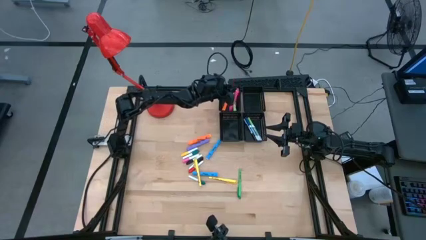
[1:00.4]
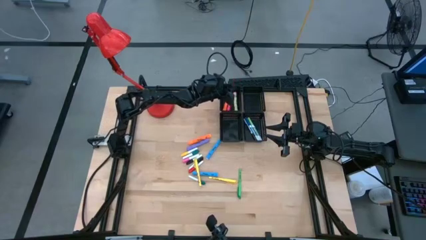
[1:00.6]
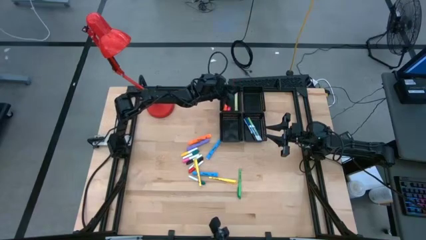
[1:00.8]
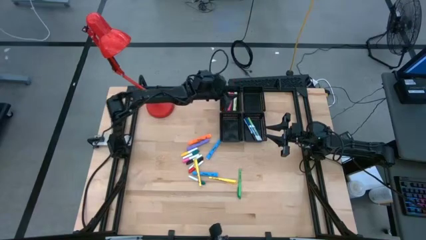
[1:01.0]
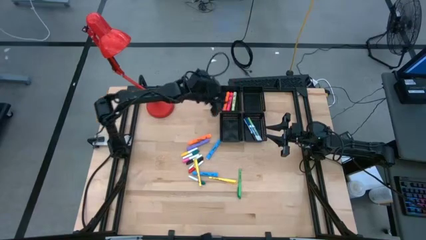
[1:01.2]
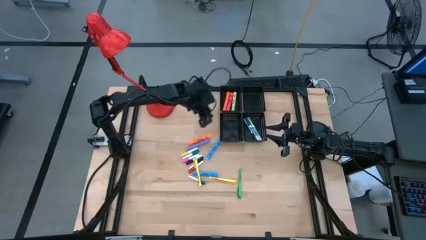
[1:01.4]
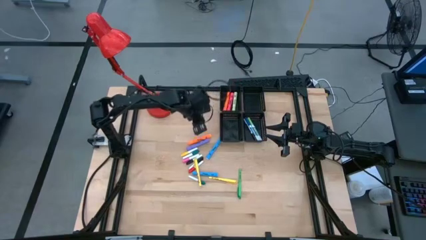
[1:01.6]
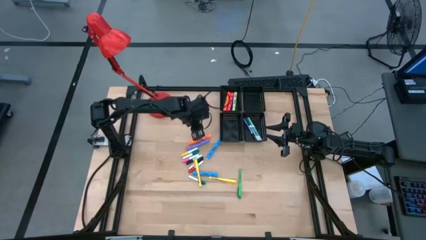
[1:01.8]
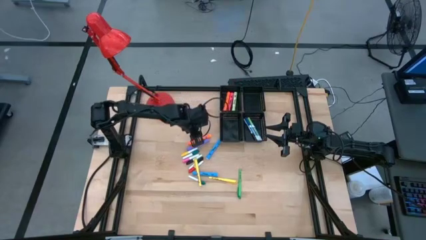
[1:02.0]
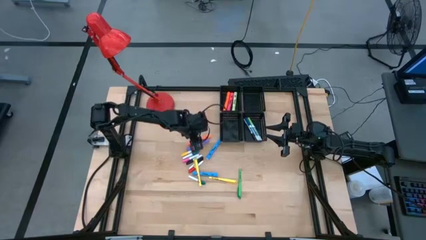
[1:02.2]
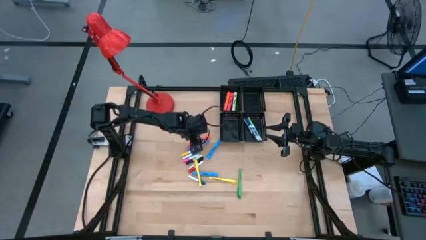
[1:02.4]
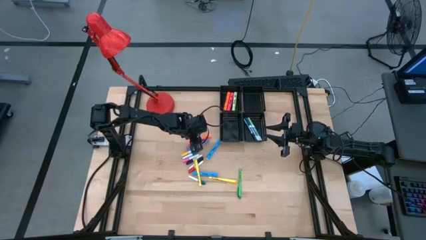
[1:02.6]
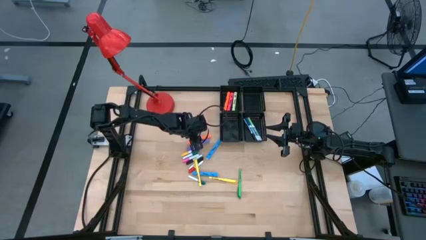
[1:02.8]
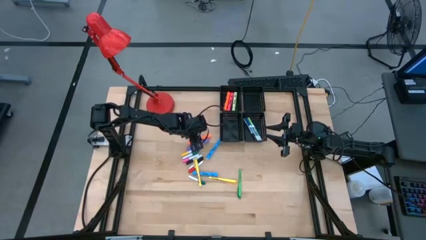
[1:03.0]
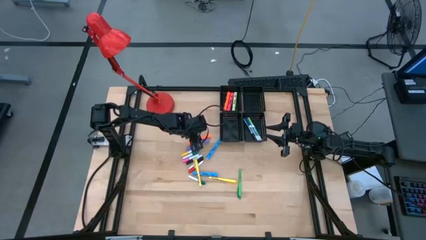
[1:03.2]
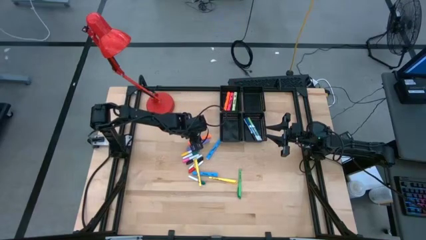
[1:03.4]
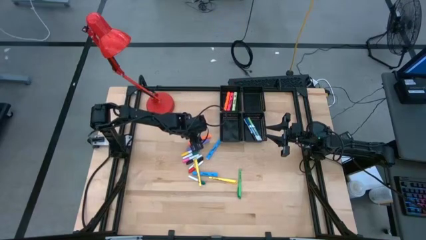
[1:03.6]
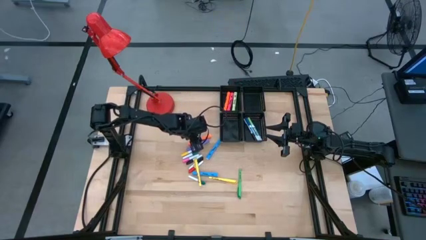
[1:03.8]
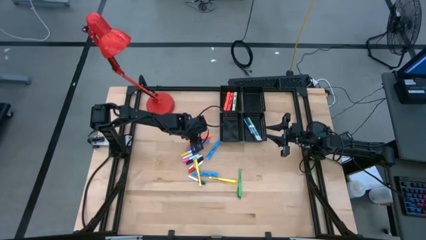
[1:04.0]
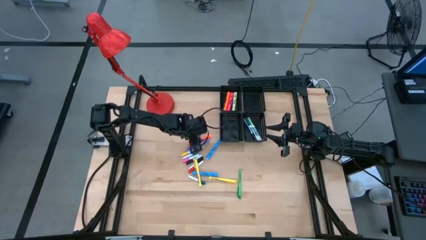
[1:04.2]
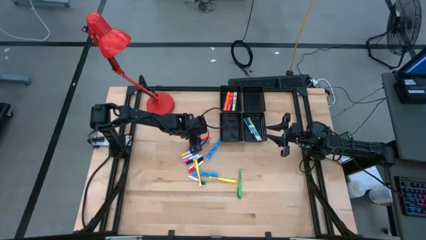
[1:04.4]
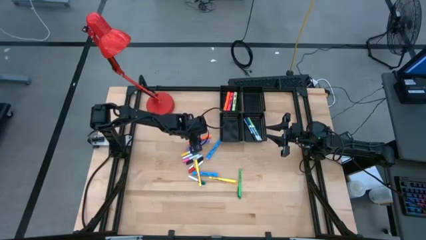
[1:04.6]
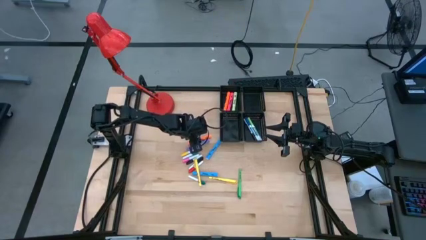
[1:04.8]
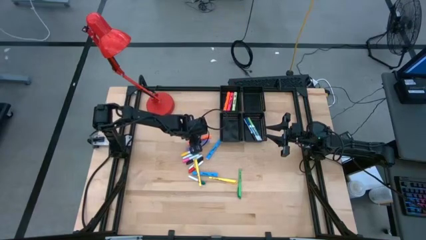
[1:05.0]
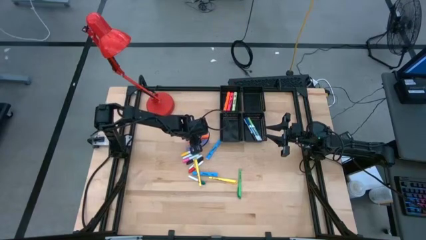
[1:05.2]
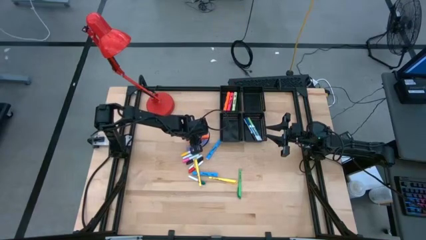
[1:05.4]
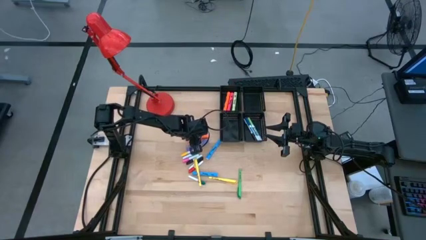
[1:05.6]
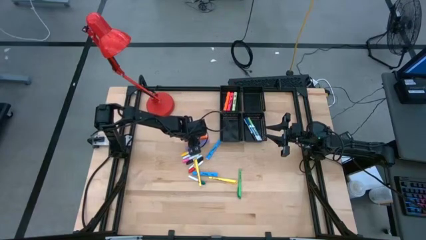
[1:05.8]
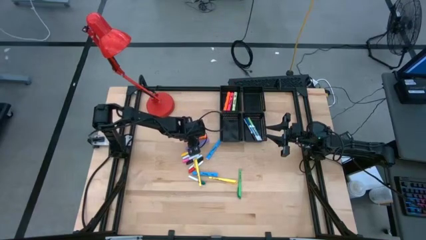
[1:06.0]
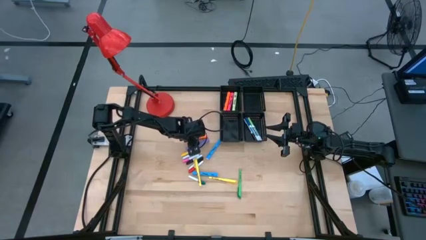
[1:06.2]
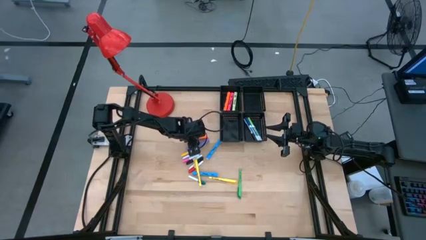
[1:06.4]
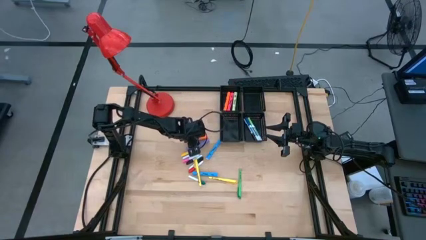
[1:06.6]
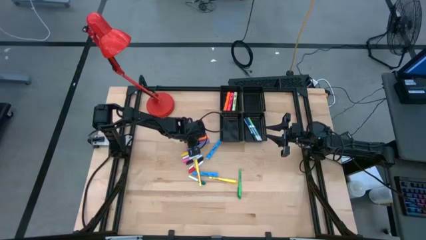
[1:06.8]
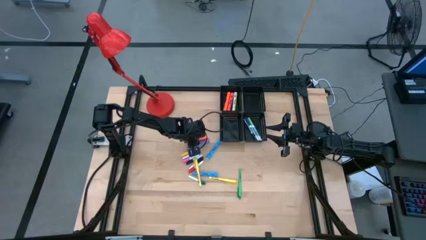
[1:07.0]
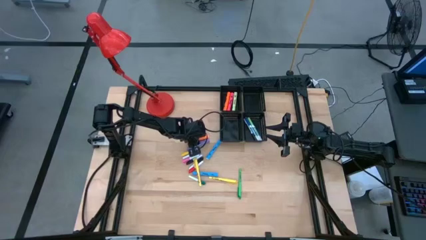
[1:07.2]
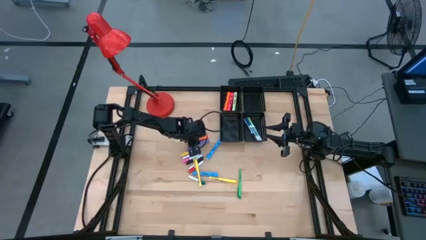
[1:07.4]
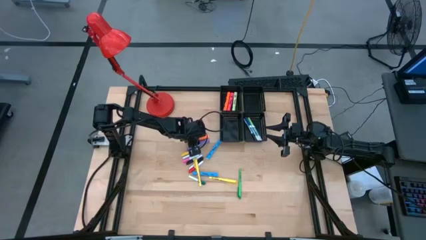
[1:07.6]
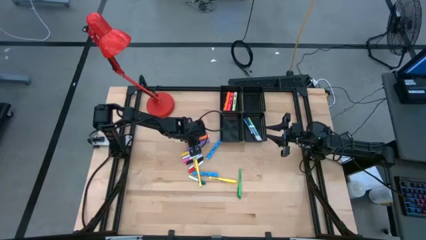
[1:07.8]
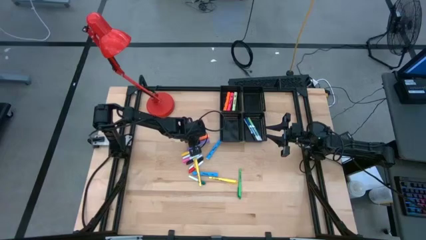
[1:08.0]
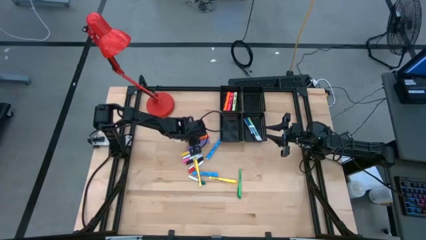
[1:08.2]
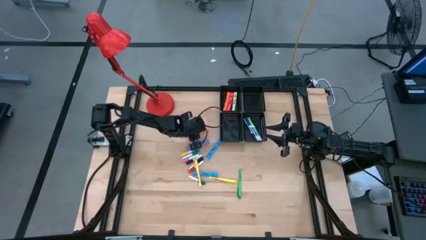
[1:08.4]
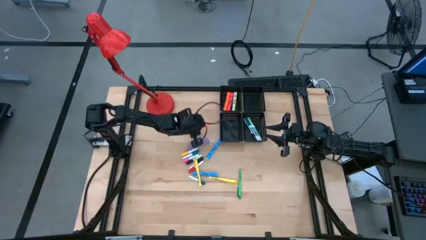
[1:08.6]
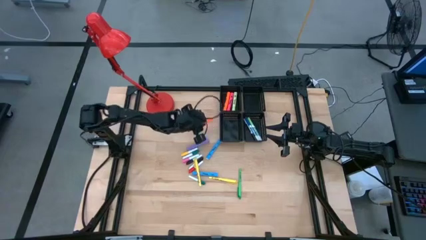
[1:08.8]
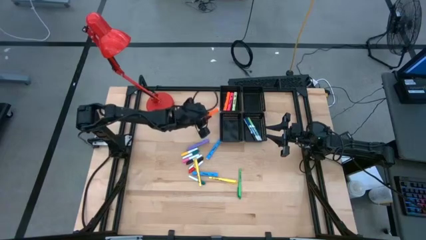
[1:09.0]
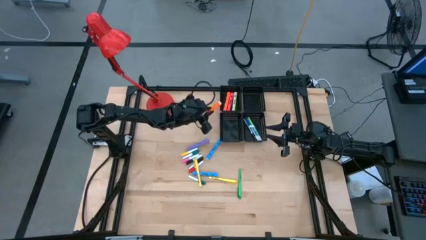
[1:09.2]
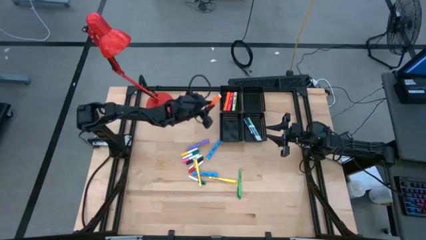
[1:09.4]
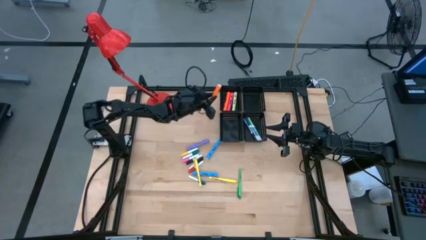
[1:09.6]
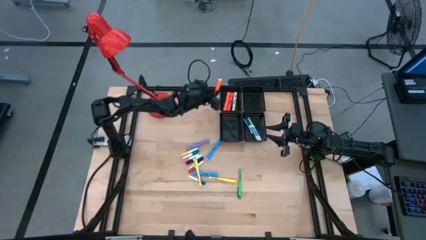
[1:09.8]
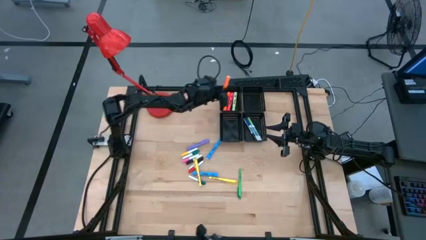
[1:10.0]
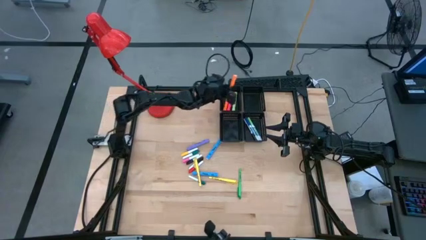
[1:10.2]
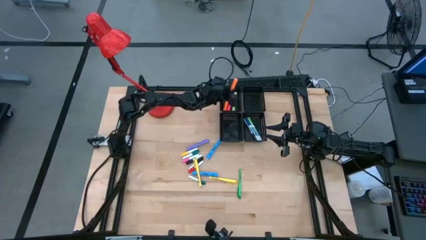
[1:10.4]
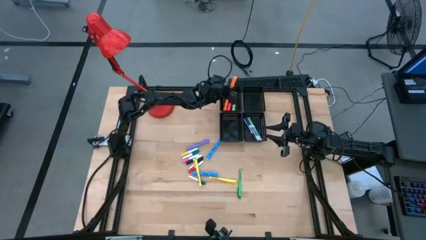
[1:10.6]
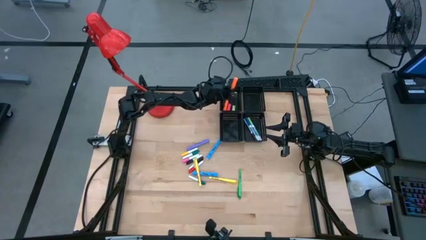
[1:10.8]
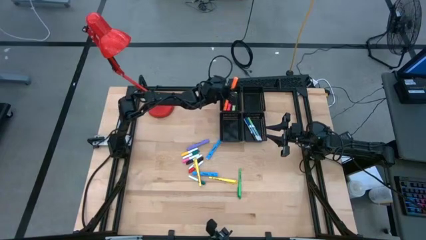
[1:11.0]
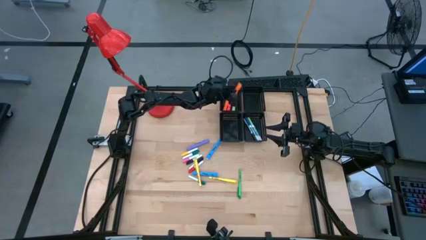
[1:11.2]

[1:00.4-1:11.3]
Task: Pick & Place Markers
Put the orange highlighter pen into the top left black bin

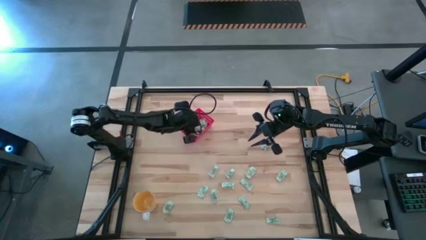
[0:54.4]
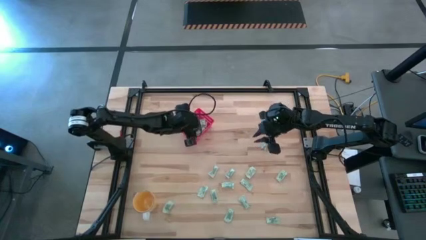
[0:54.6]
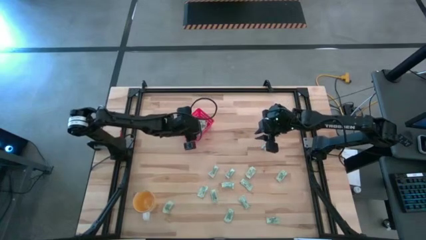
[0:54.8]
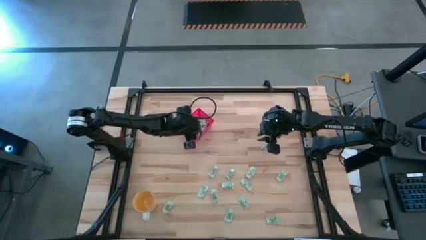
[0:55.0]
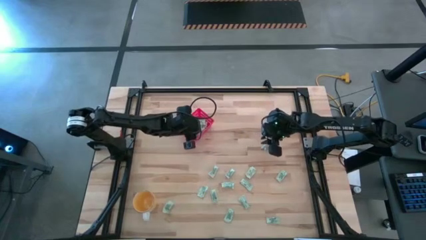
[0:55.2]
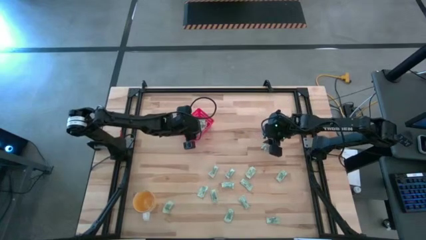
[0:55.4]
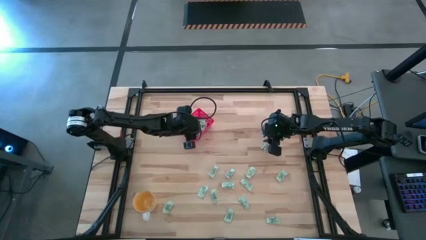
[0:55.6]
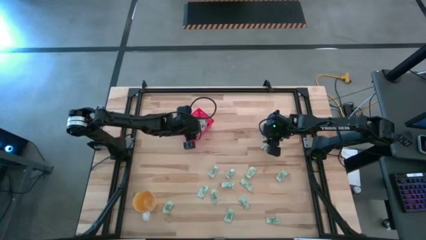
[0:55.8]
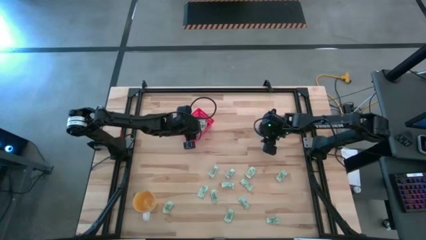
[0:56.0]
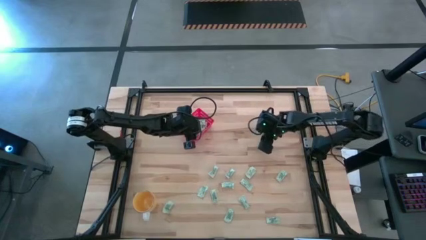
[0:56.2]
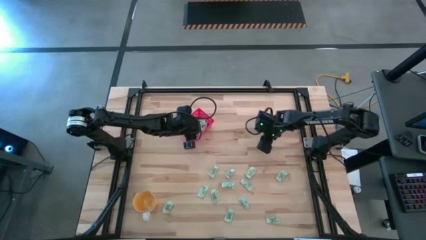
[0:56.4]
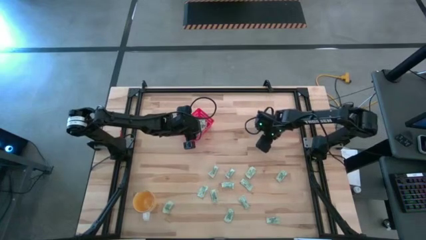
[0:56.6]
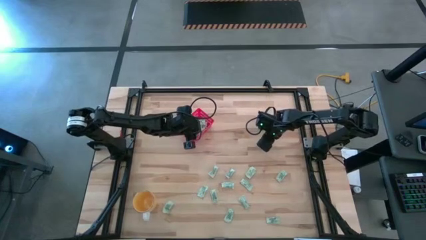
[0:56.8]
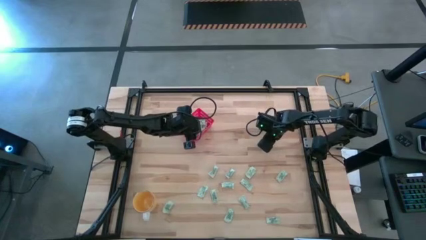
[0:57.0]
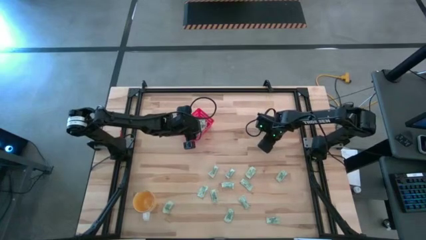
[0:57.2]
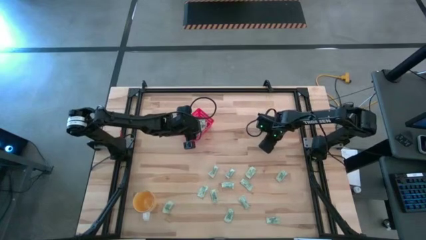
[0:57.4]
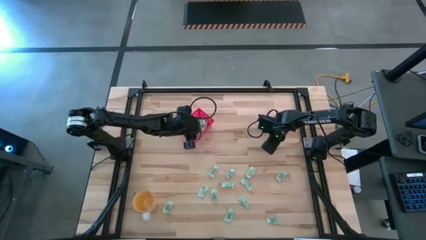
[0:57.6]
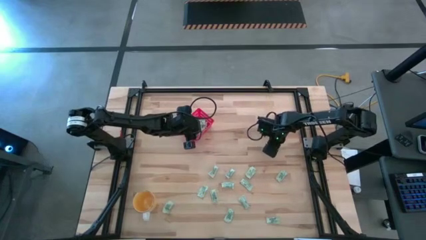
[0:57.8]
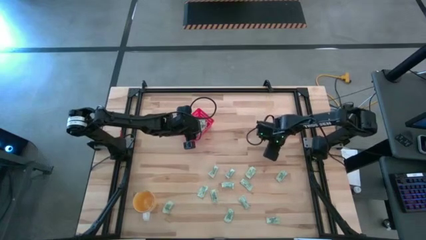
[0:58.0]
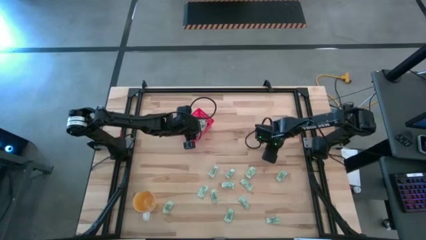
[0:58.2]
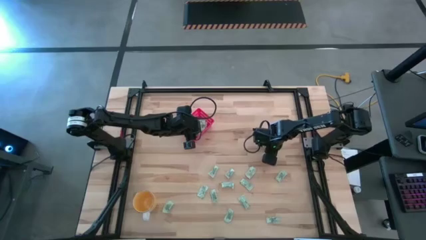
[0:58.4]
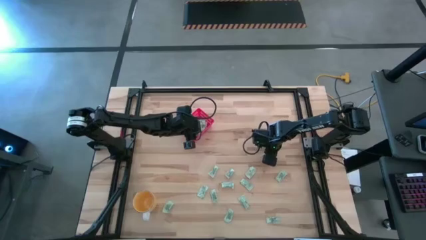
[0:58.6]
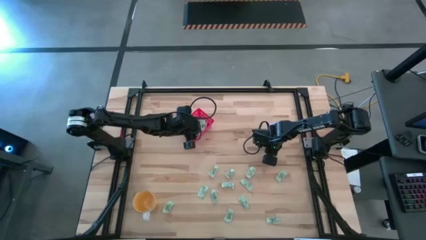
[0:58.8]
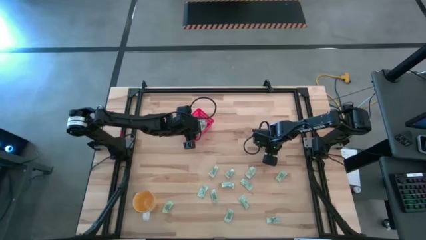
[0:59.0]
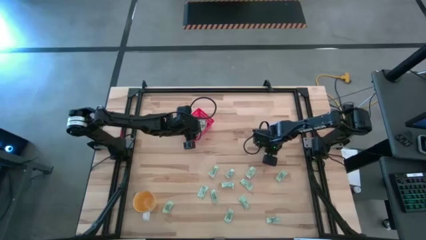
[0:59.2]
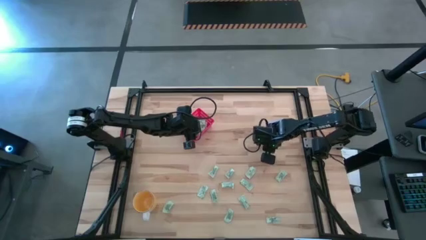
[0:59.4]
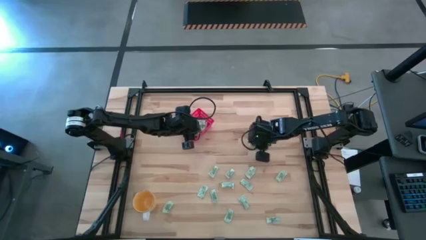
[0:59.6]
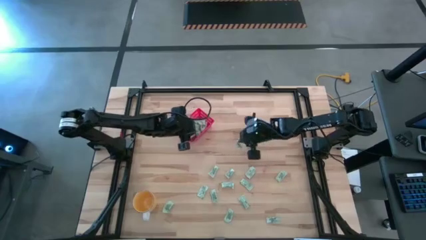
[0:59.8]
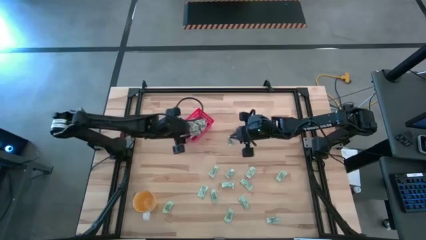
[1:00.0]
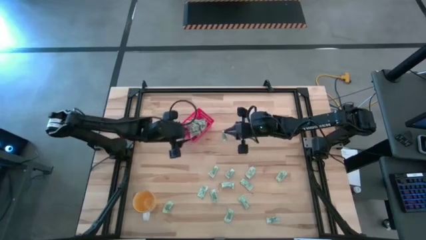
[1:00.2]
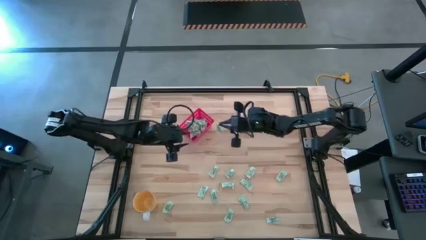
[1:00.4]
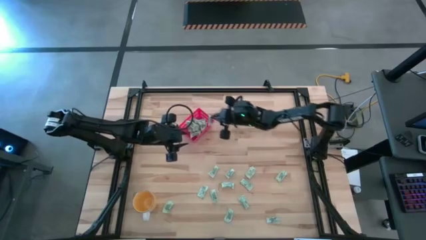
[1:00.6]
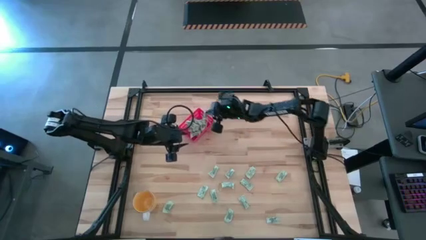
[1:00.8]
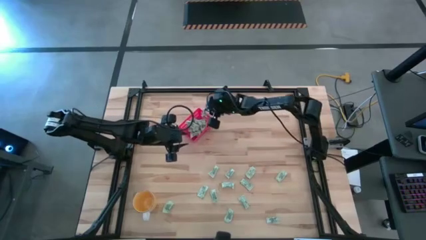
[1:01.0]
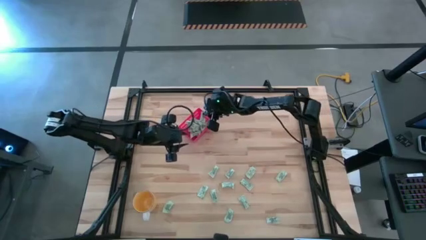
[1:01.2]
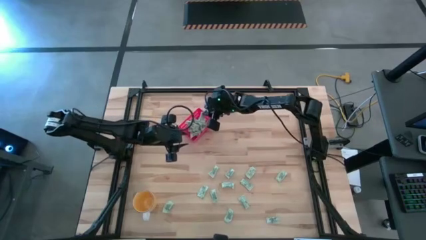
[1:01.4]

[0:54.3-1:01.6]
Task: Pick and place Stevia / Truvia into bins
Put the white stevia packet into the red bin
